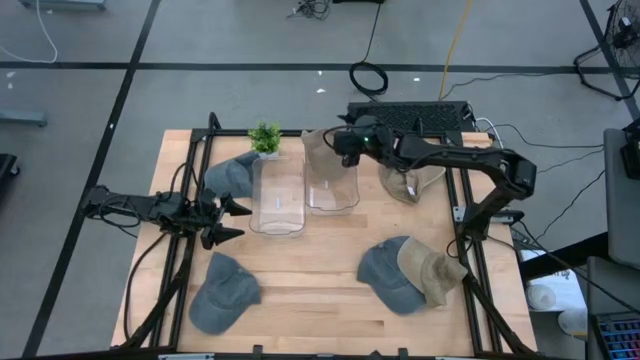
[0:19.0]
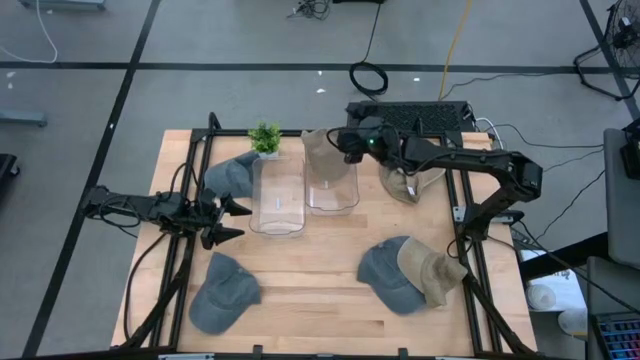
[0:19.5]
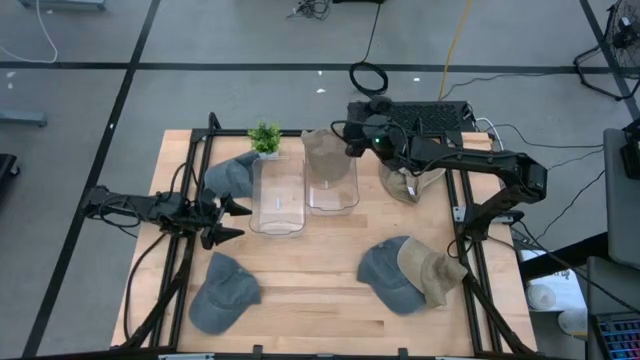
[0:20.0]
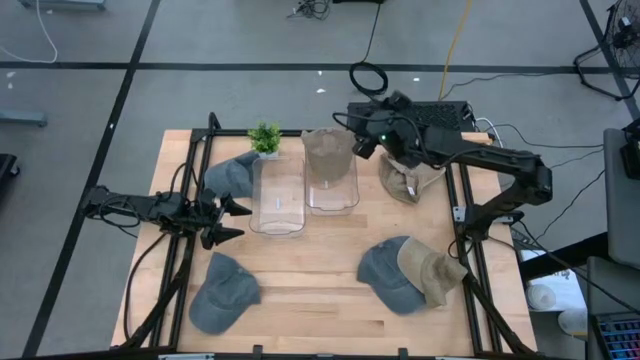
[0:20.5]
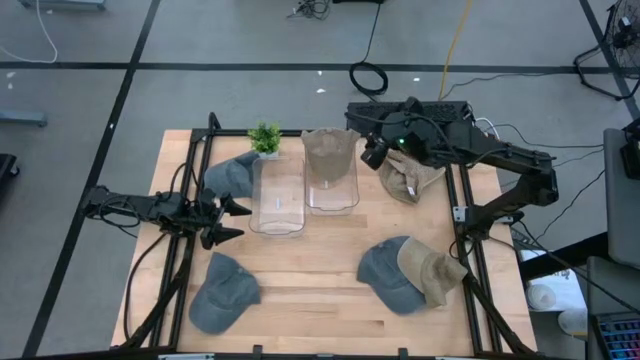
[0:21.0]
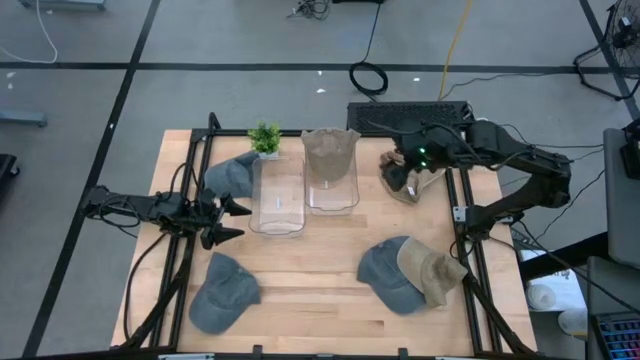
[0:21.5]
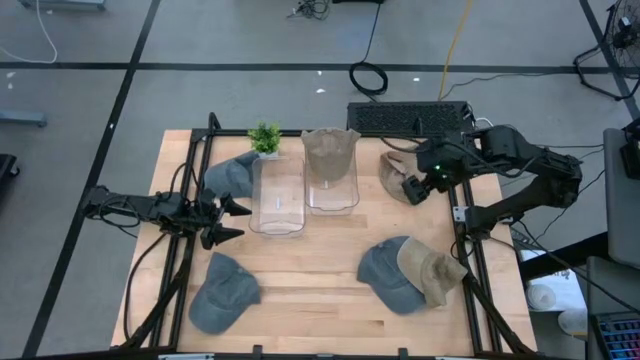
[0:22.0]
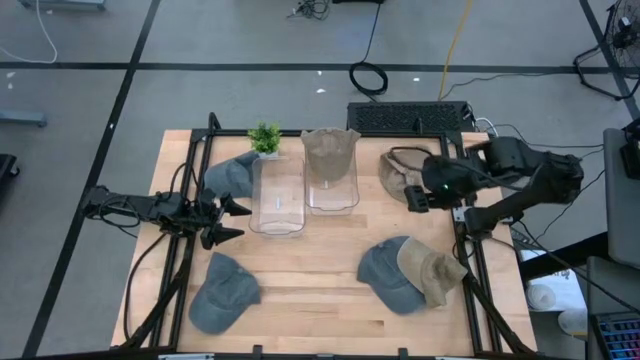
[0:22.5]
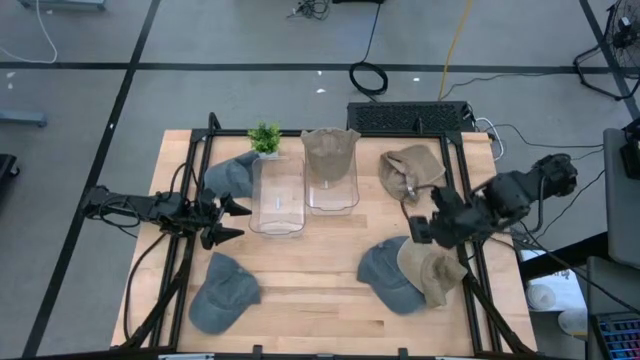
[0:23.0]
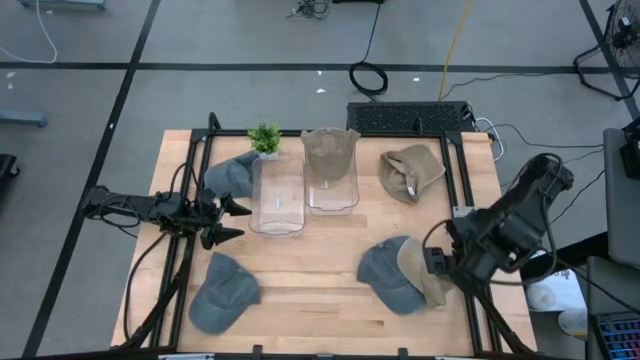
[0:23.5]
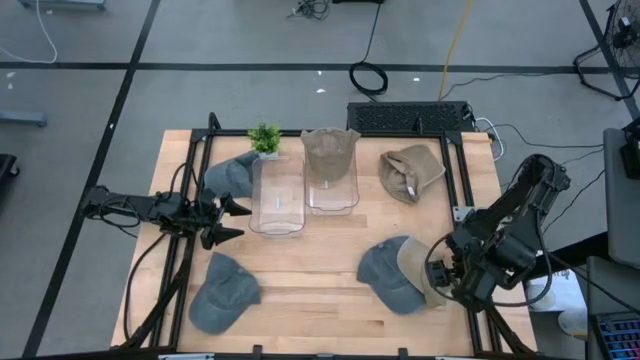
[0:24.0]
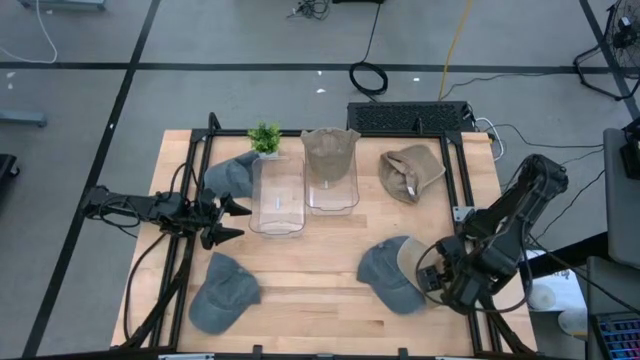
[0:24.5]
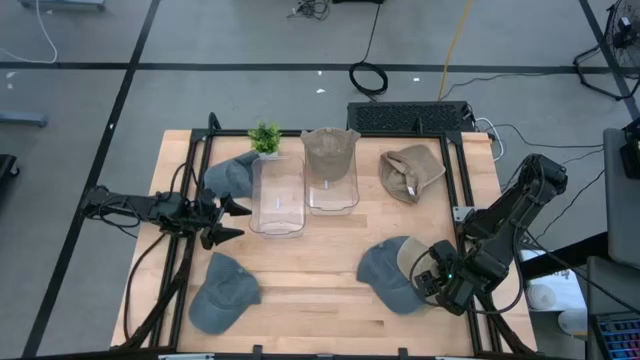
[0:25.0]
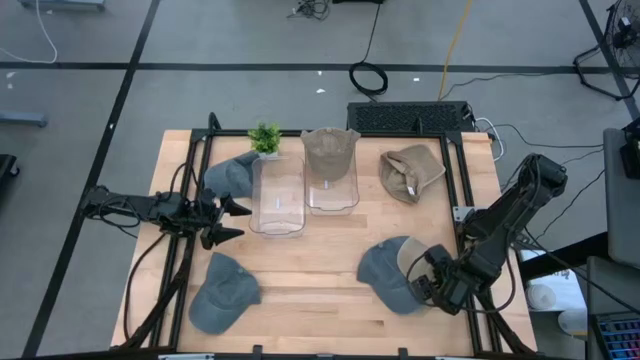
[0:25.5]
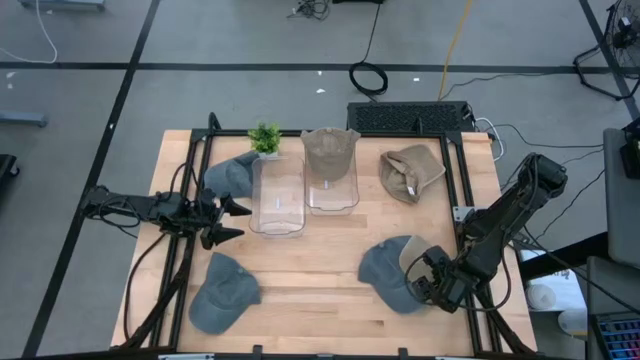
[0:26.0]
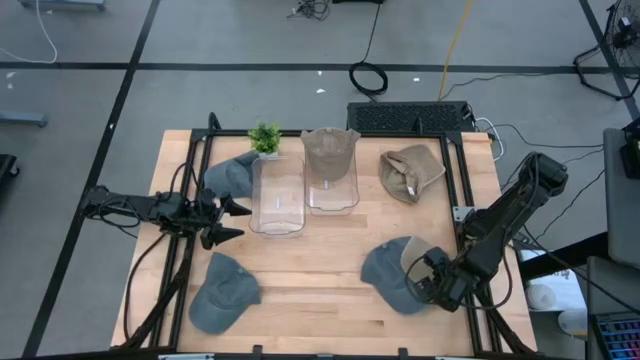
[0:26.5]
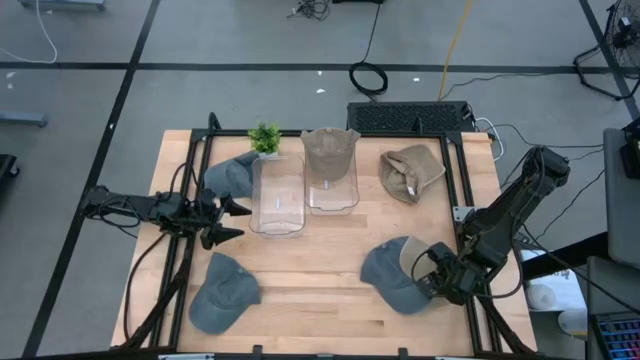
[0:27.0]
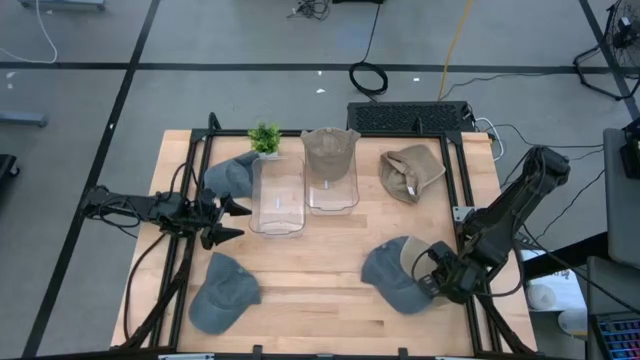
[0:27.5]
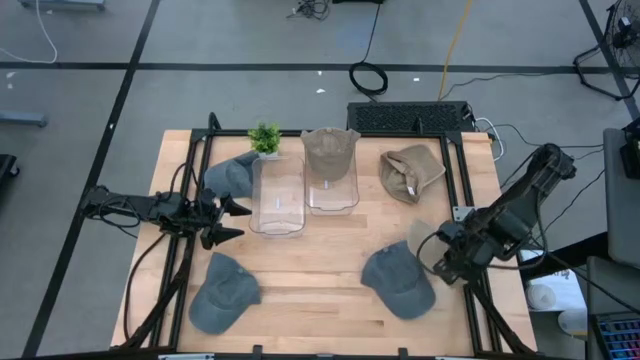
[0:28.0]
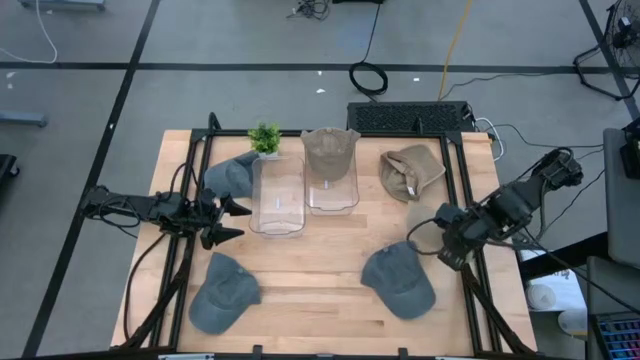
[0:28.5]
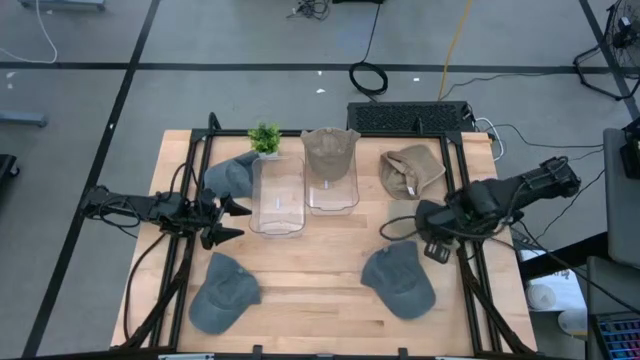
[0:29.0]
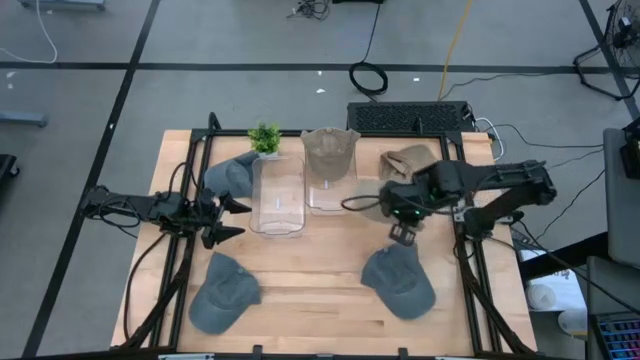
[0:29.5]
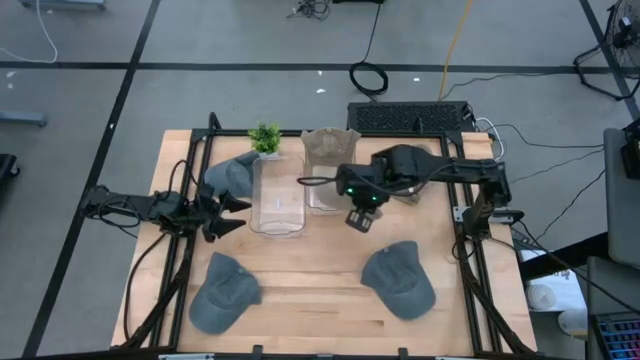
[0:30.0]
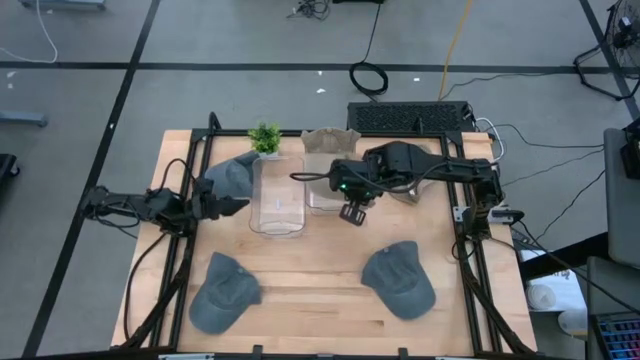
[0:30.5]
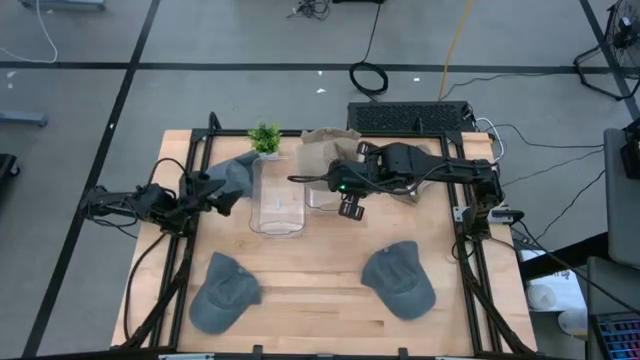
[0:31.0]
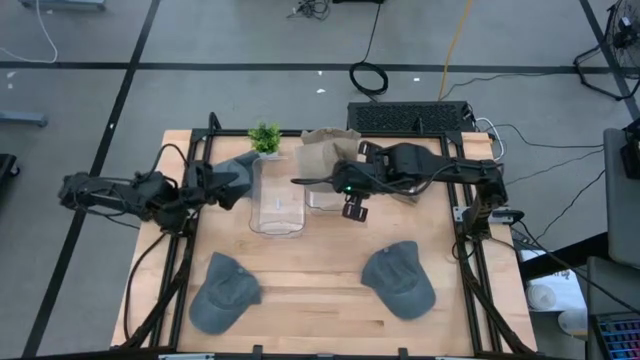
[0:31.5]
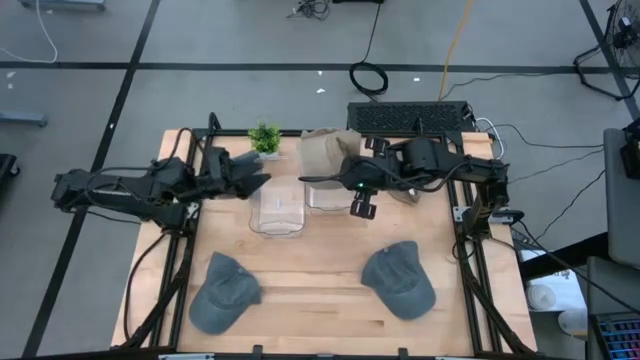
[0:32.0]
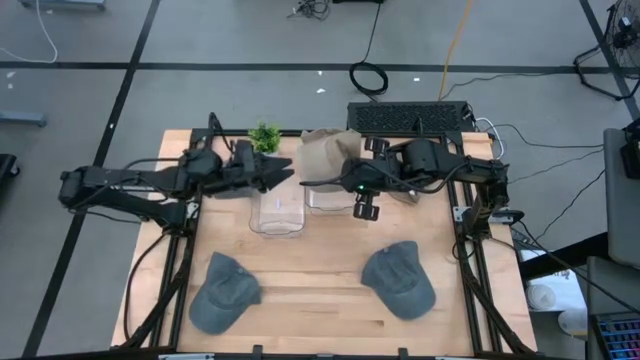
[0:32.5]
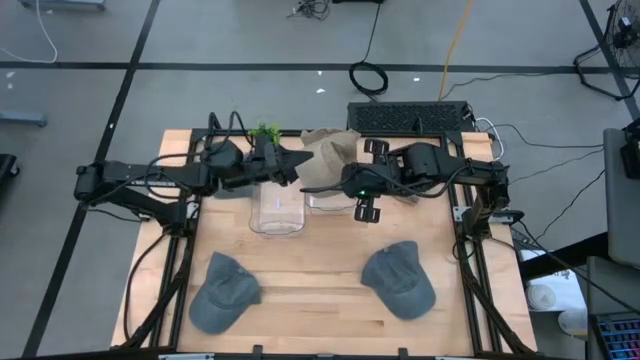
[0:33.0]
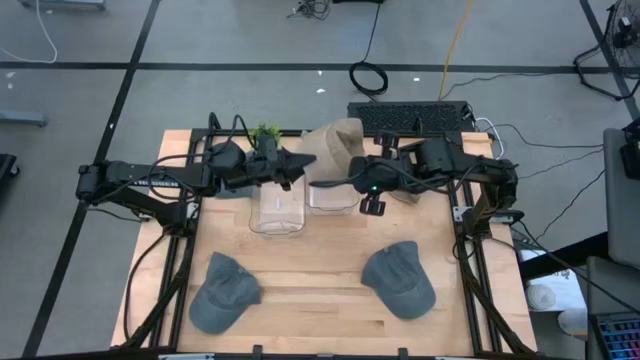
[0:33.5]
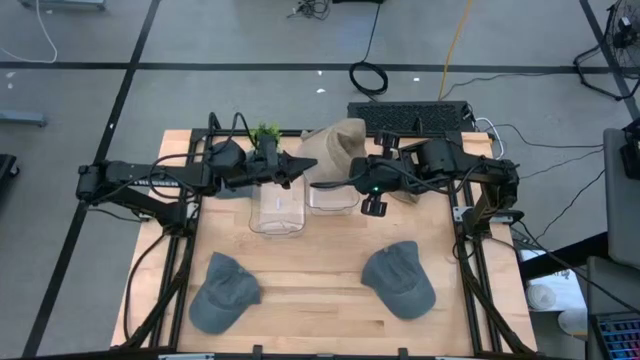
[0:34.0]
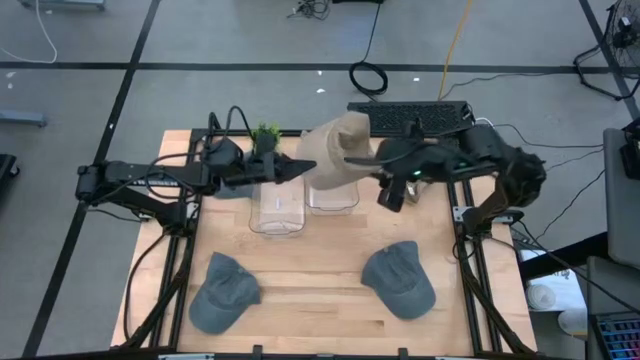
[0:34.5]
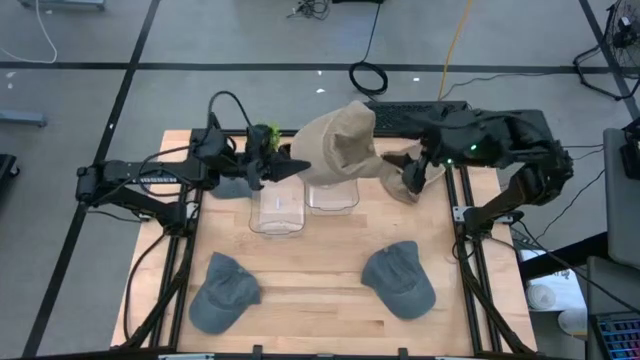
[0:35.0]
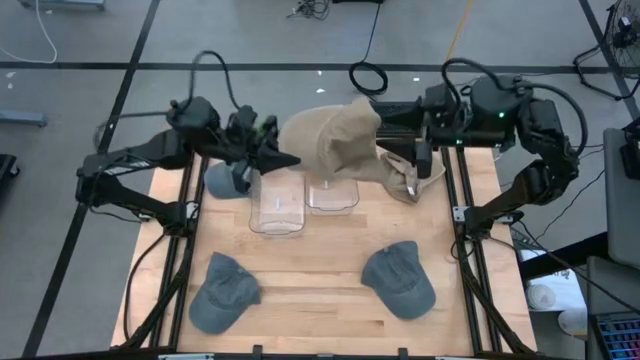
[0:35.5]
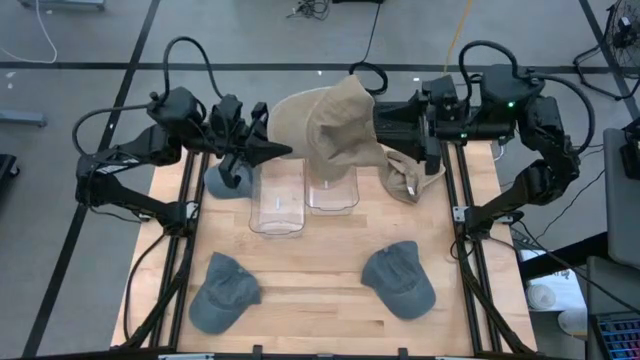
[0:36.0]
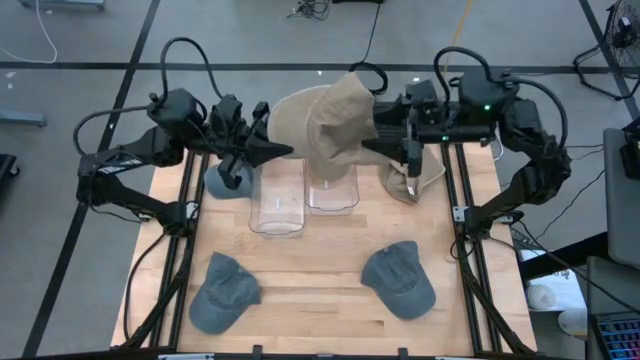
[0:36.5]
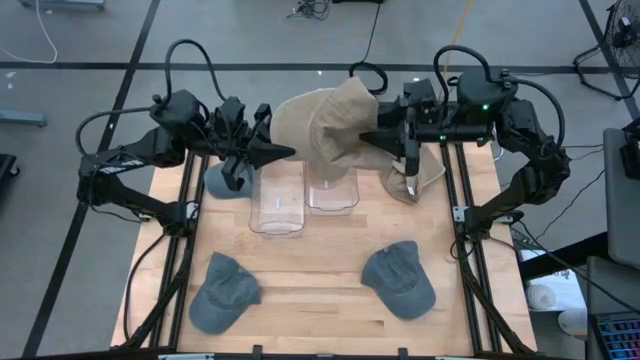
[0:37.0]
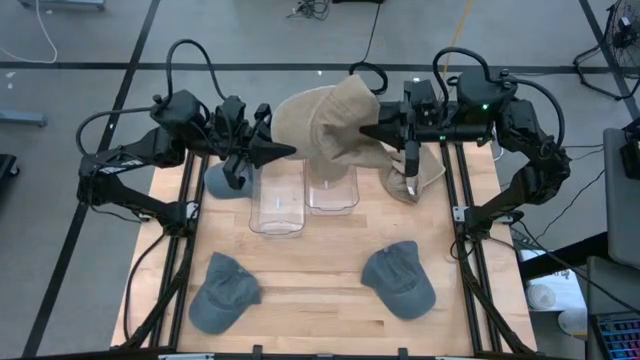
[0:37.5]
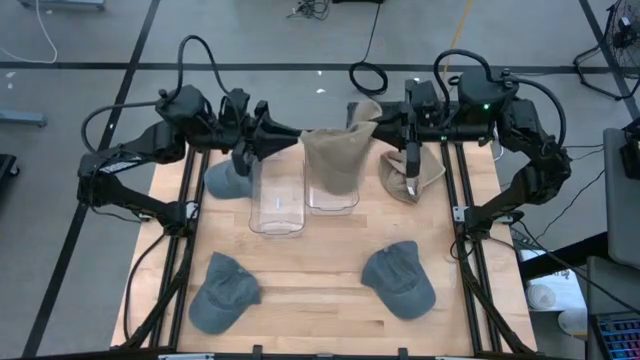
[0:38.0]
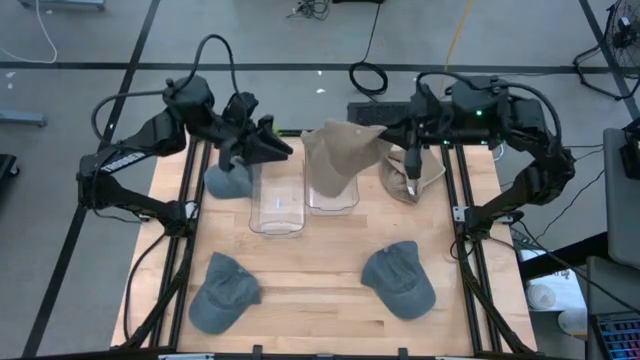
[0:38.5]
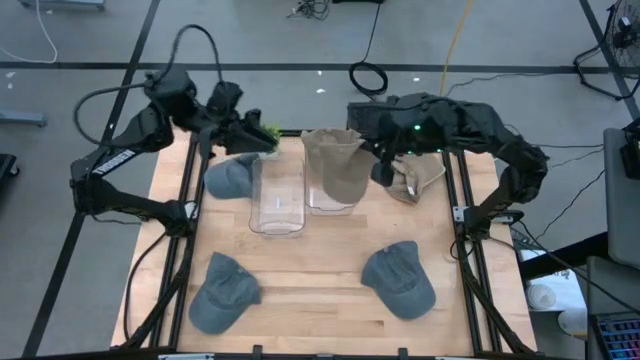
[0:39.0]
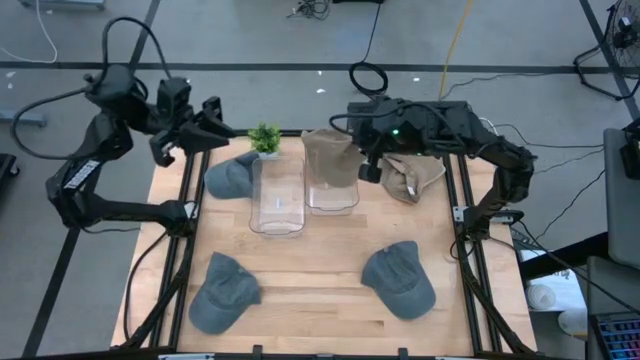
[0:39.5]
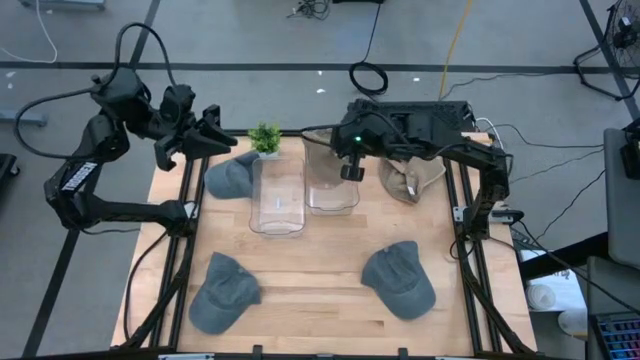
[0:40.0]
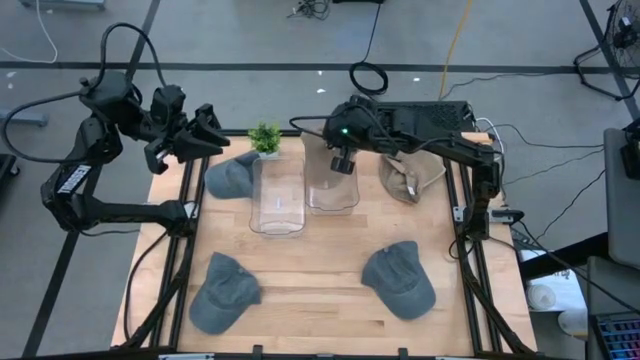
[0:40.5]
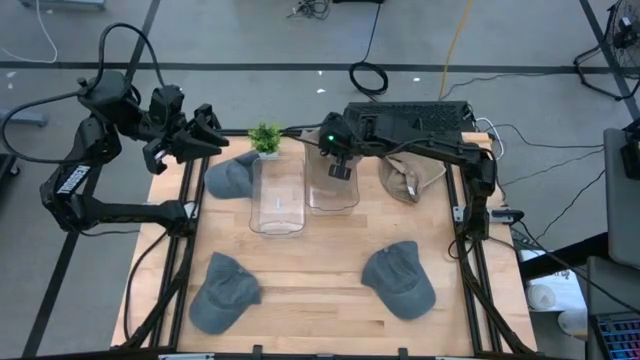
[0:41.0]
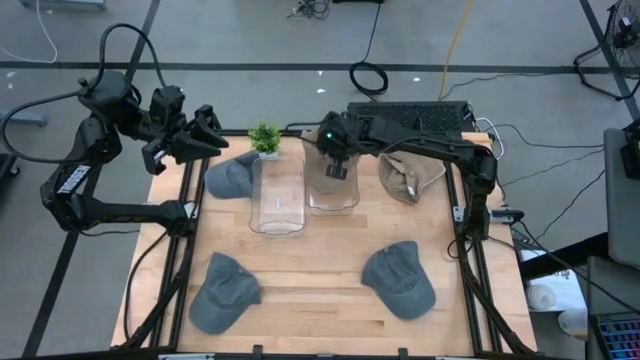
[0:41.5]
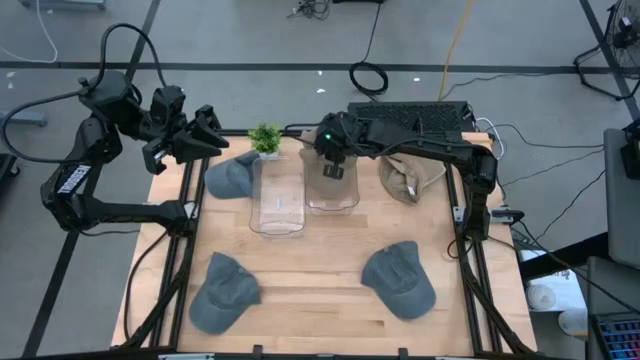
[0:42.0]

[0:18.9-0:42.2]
Task: Pick & Place hat
Put the bottom brown cap into the right transparent bin
